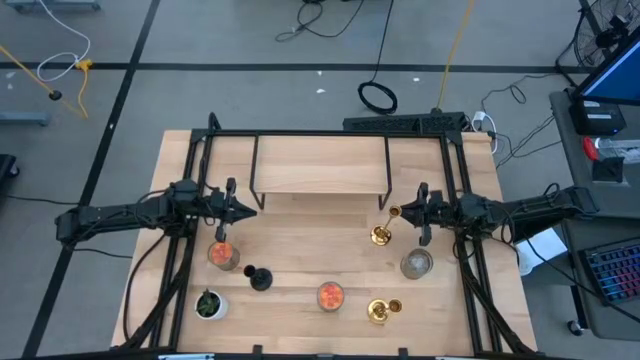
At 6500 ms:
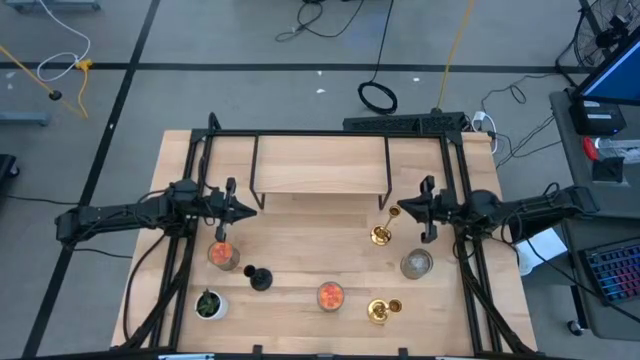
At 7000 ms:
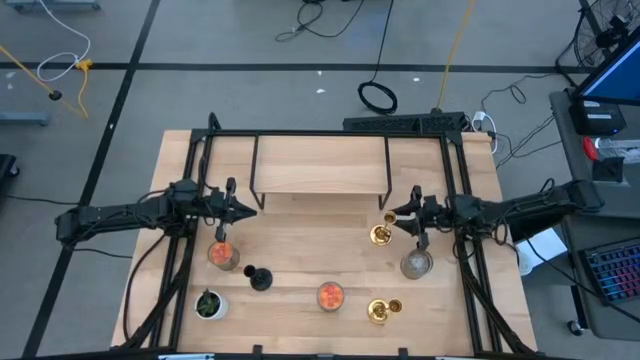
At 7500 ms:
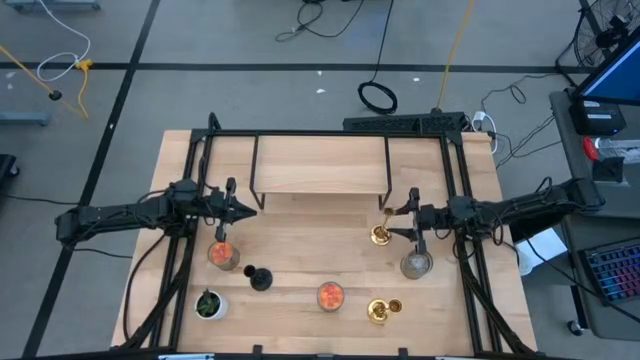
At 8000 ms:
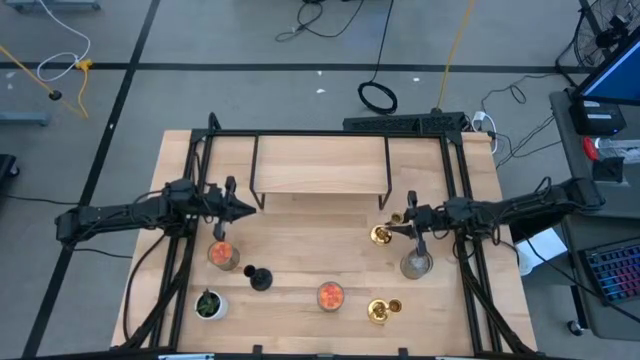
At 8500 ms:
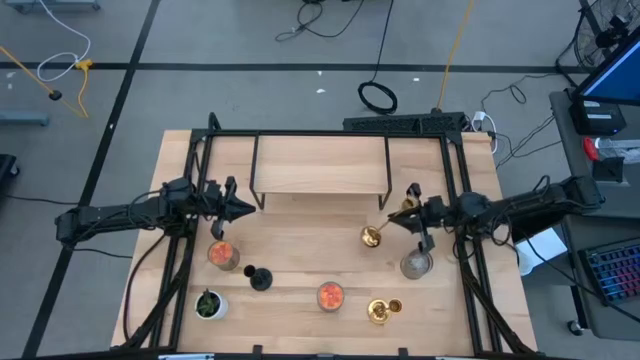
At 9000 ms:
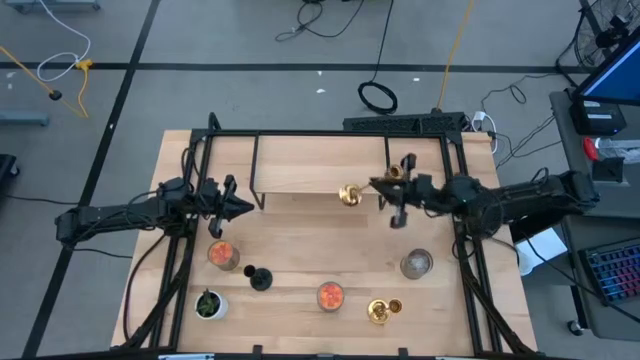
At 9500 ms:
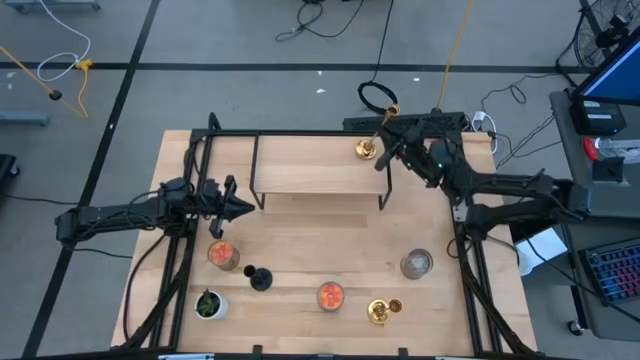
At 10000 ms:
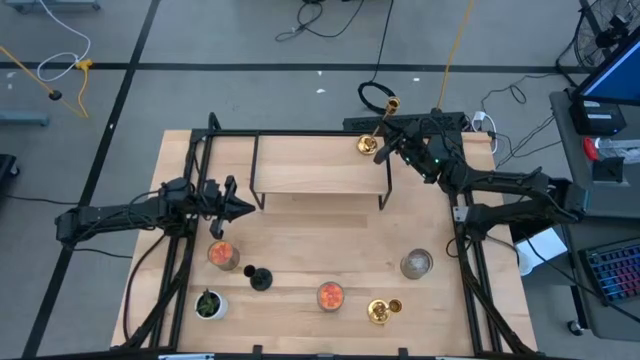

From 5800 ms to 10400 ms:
Task: Pick & Place candle stick holders
Put the top gold candle holder on the shelf

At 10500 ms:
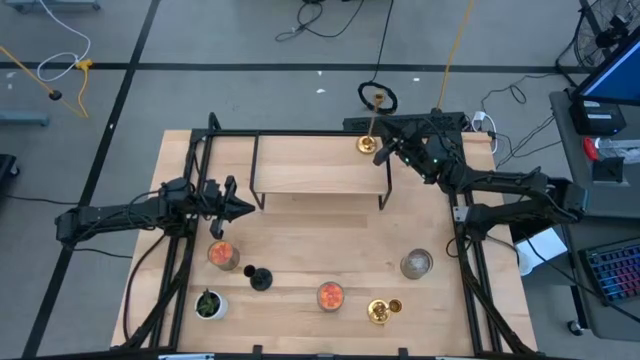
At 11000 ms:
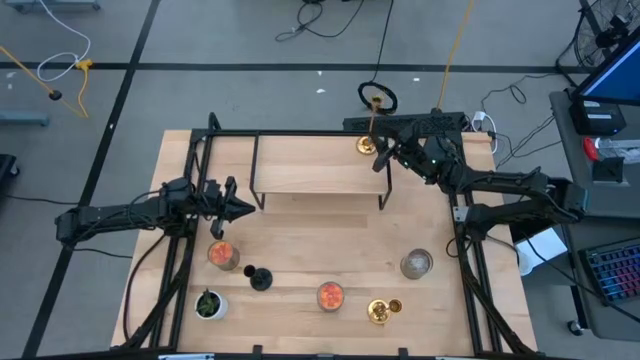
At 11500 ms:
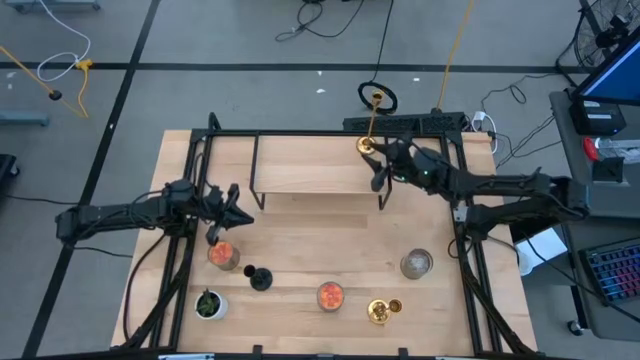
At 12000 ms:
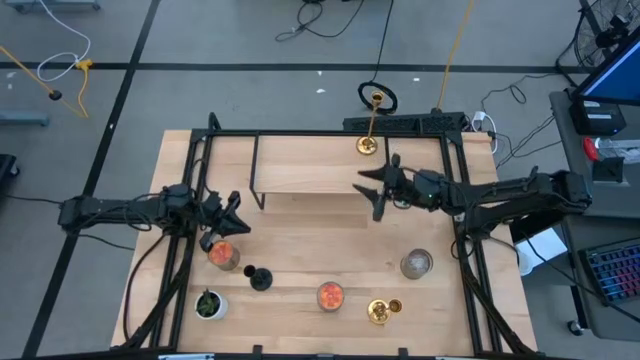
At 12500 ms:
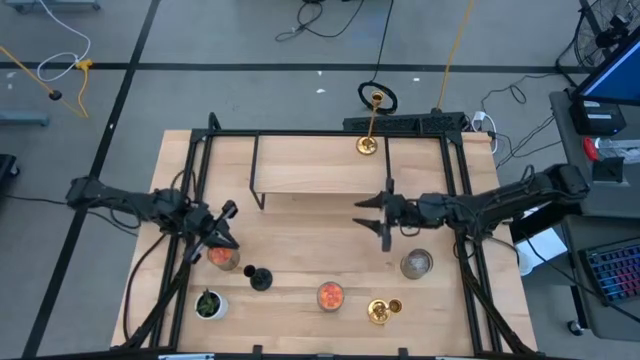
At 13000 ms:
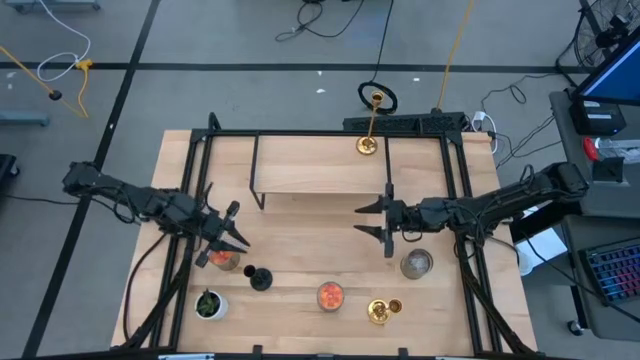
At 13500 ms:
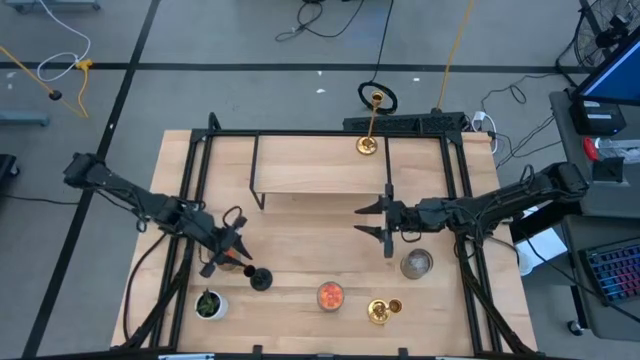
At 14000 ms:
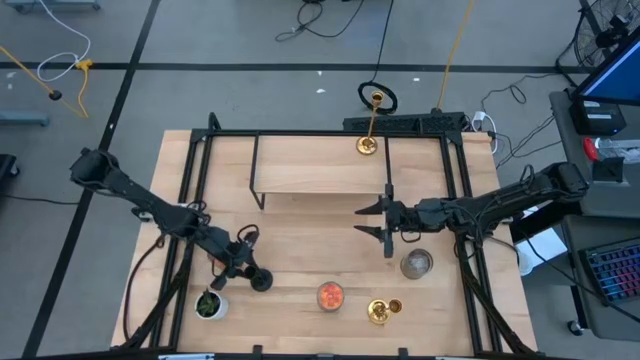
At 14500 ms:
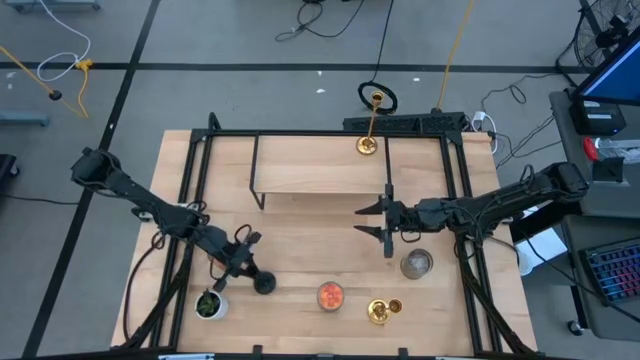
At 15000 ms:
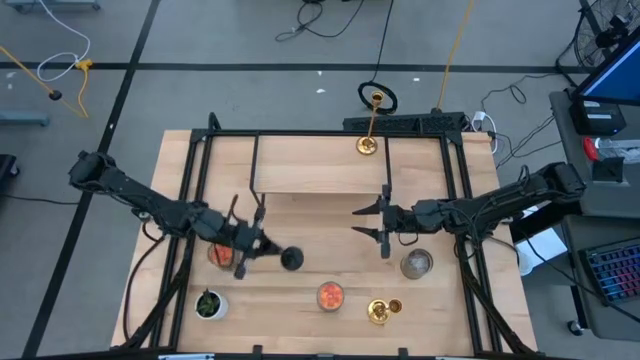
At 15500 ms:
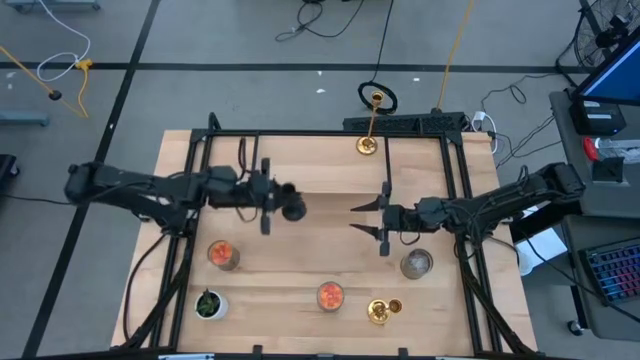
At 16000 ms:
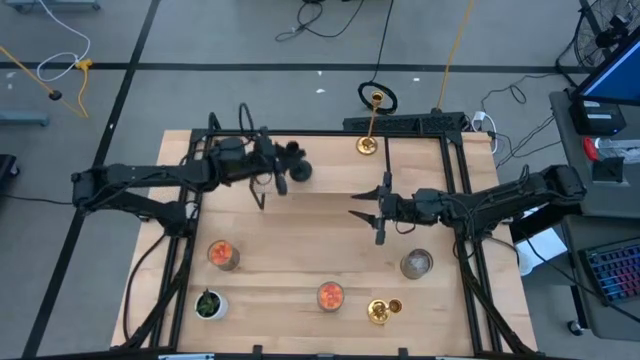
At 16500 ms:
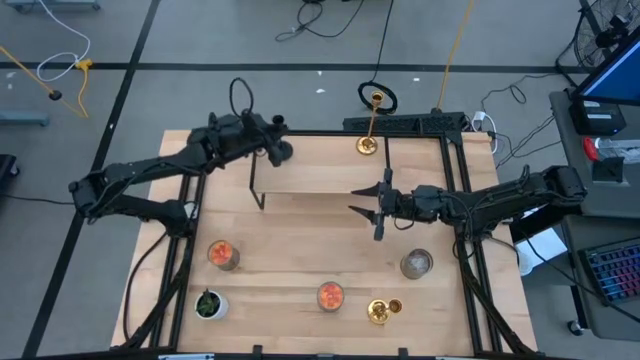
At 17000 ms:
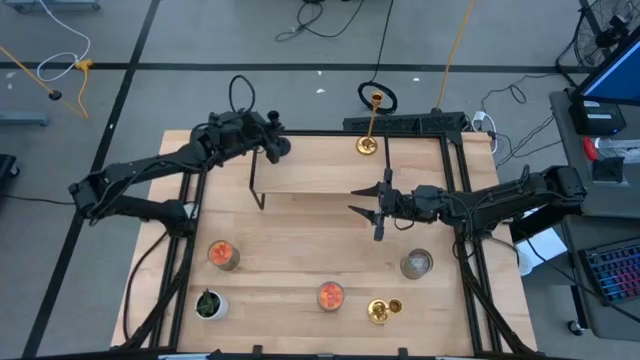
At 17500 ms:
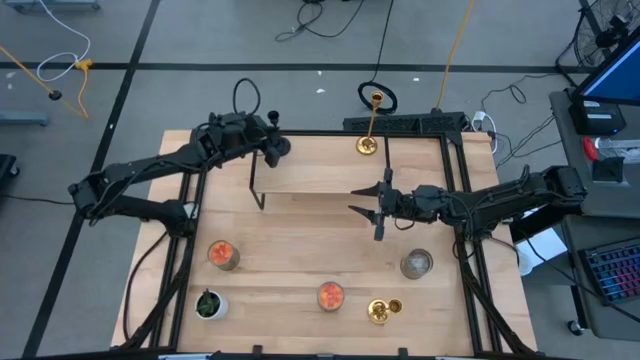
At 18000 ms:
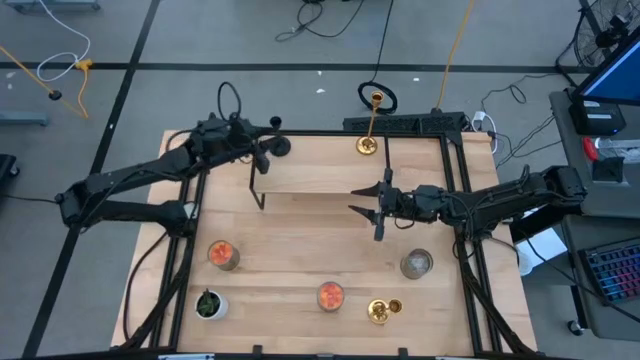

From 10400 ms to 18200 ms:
Put the black candle holder on the shelf

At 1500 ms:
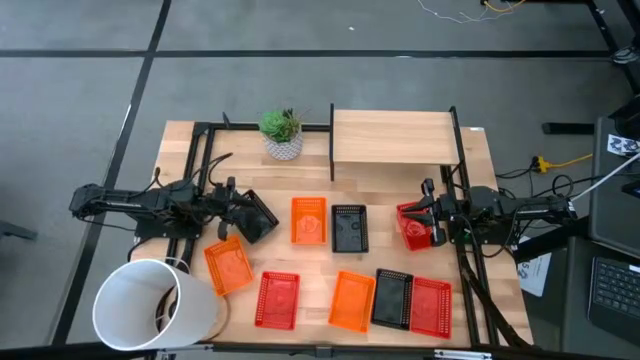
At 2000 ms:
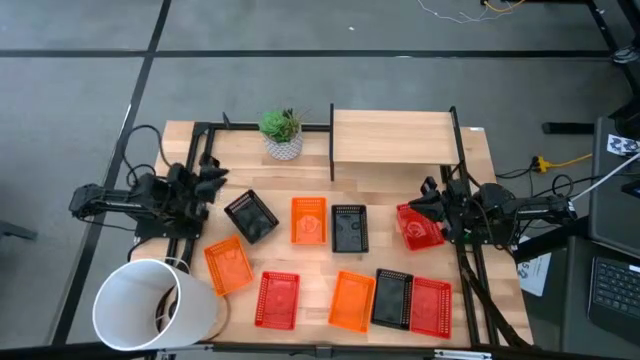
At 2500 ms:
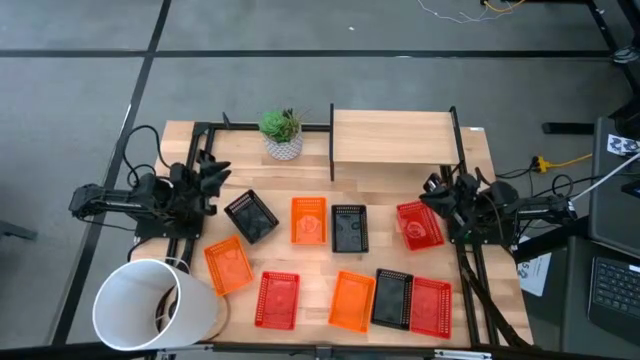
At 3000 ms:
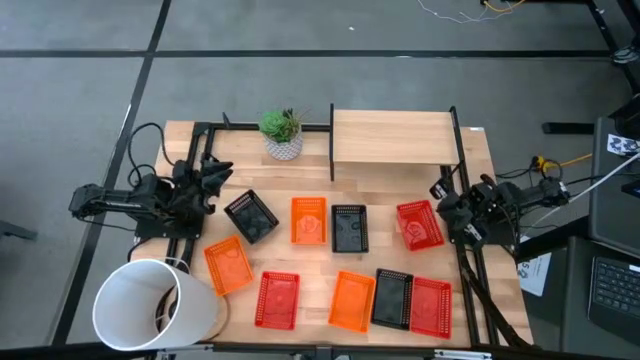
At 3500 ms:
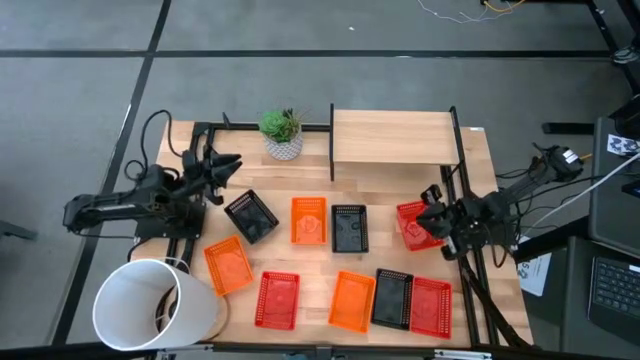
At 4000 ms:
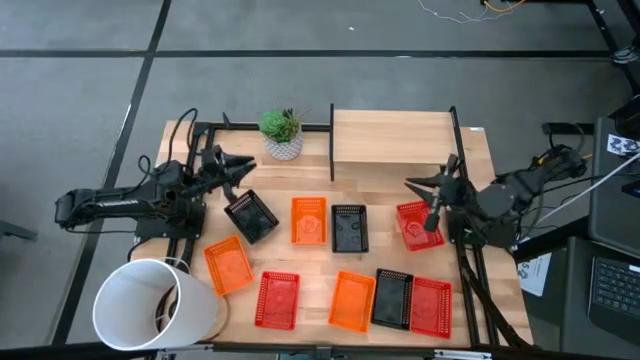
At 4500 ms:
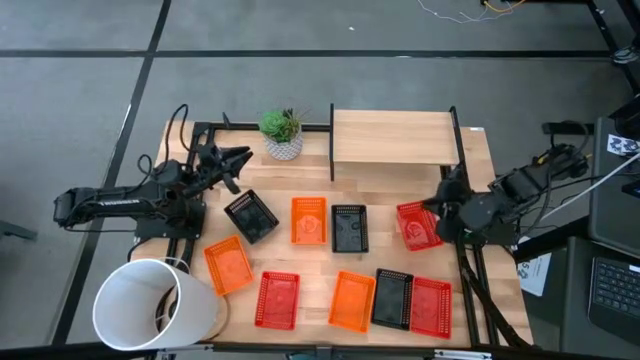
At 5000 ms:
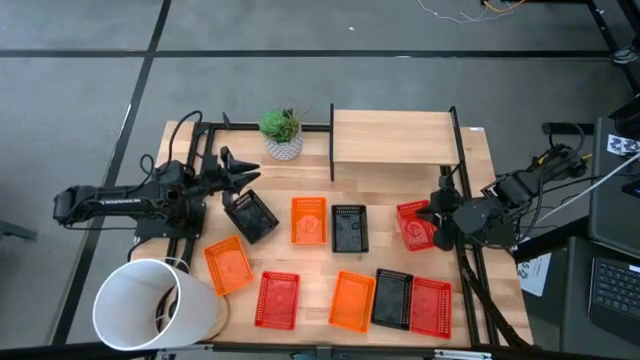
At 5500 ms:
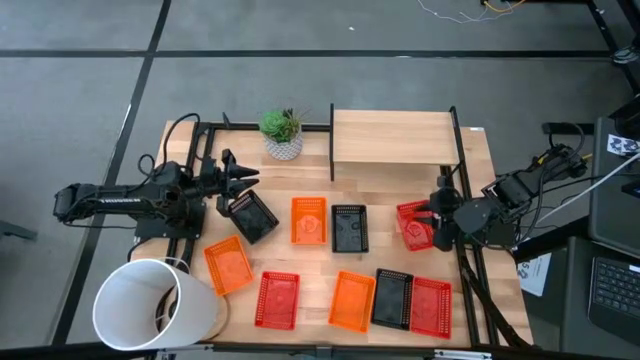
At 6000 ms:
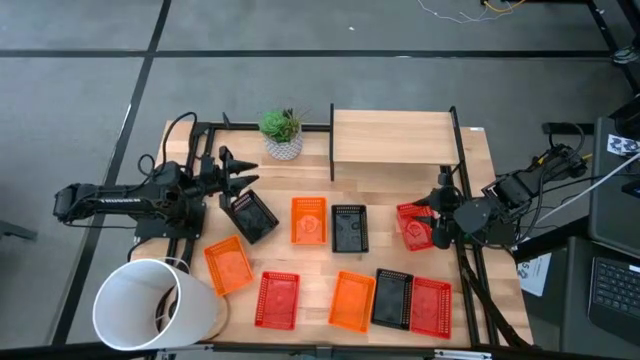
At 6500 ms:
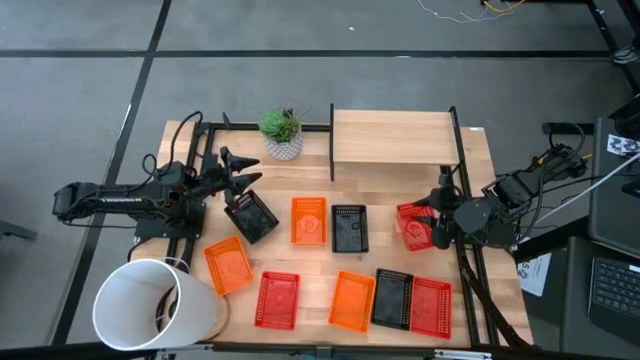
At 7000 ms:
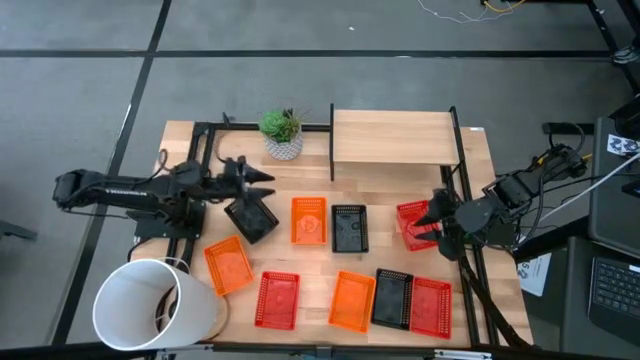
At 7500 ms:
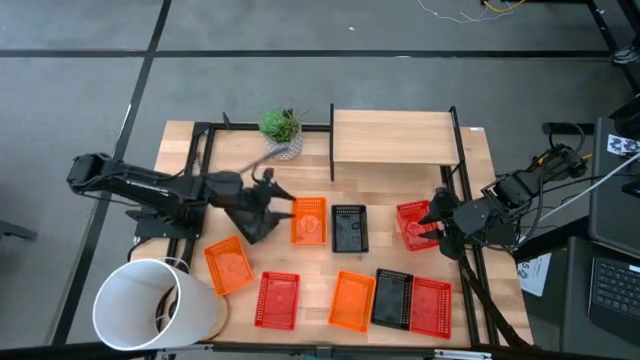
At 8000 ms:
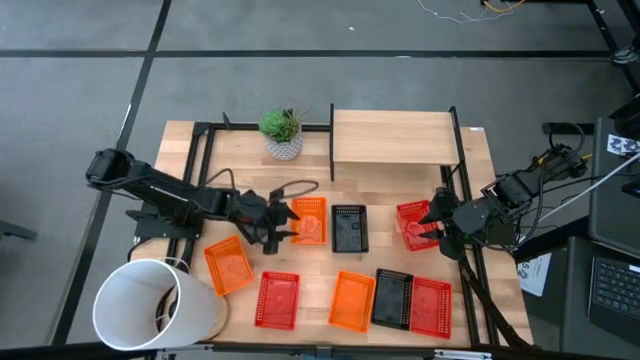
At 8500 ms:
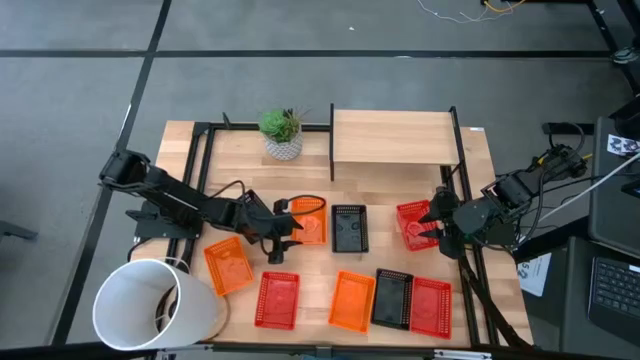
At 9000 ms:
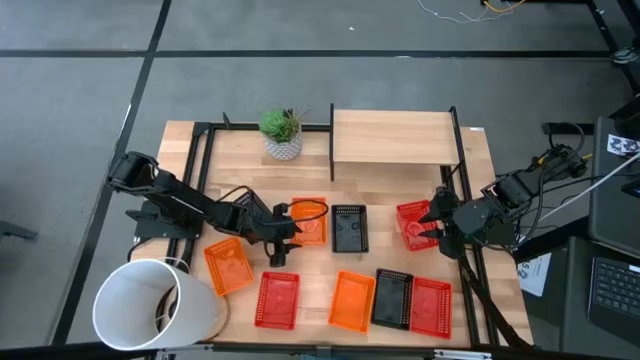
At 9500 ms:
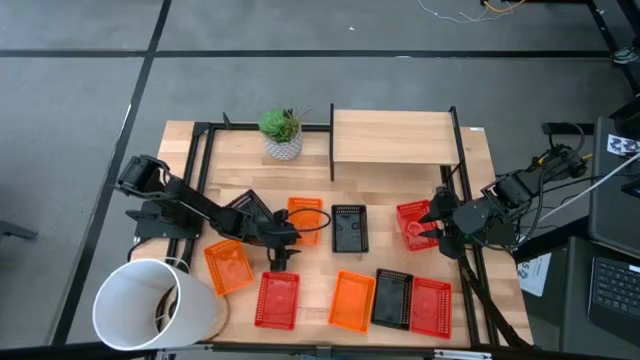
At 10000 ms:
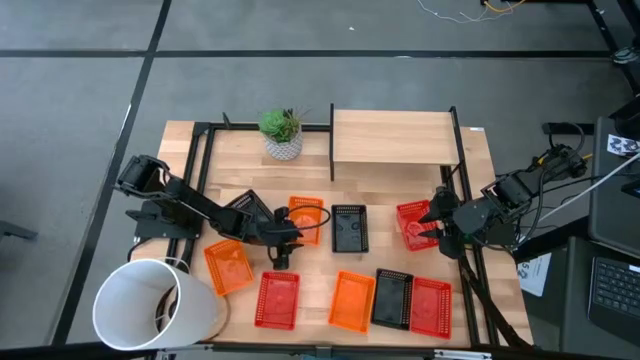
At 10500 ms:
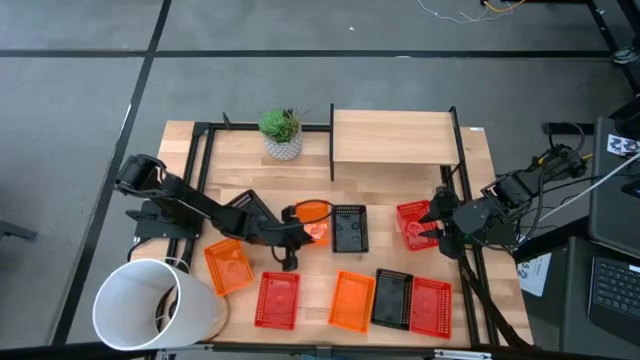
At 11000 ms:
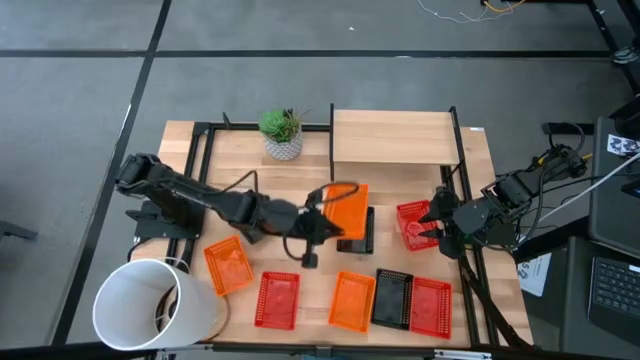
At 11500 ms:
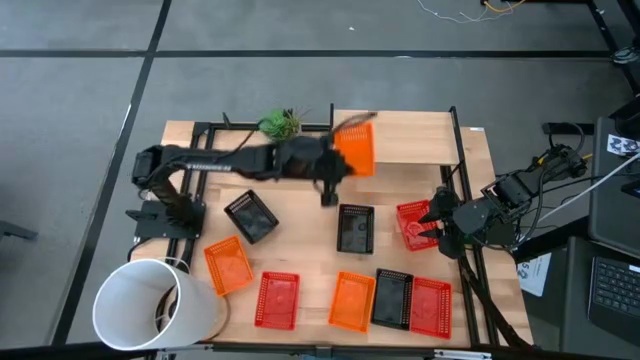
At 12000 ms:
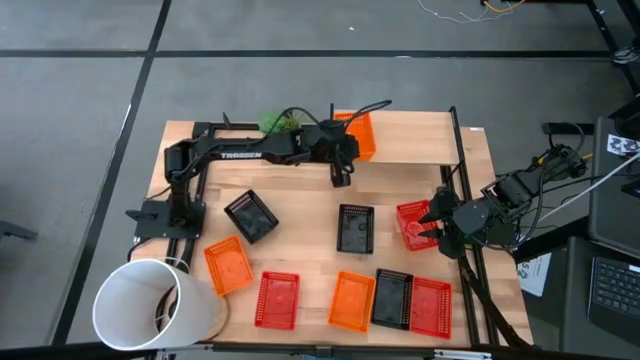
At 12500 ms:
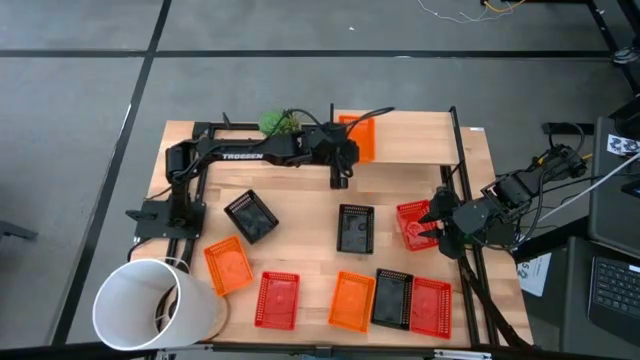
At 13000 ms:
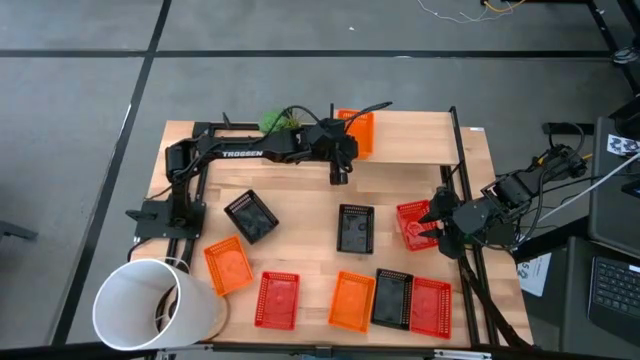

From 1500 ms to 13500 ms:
Task: Stack baskets on shelf by color
Put the top orange bin on the shelf
